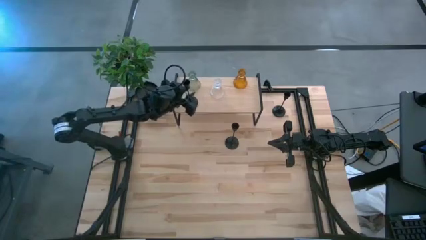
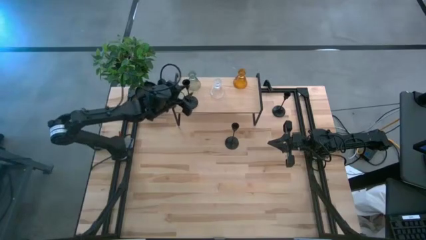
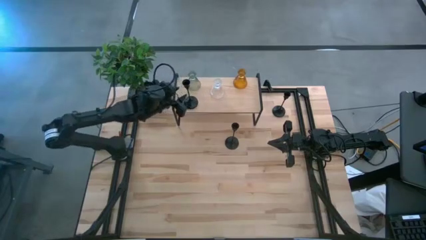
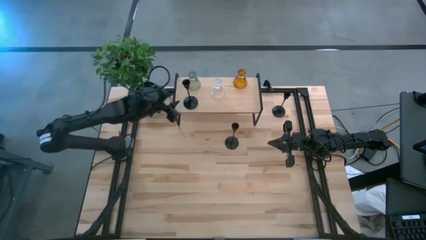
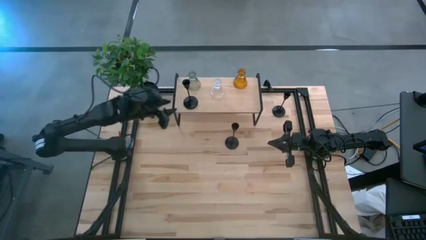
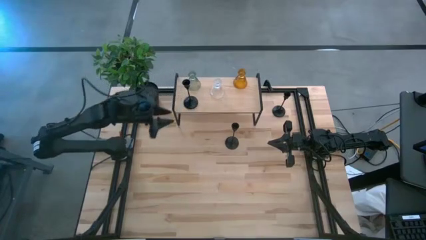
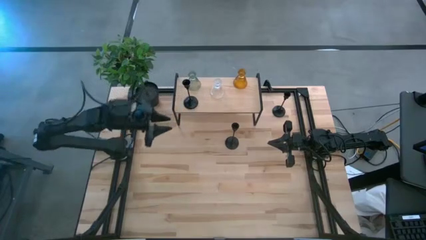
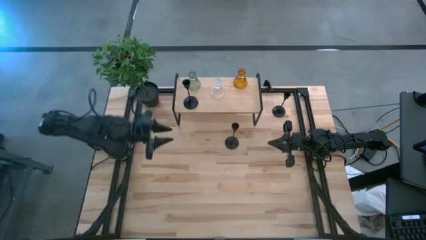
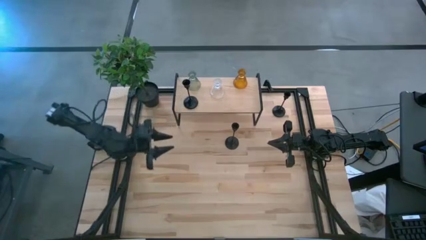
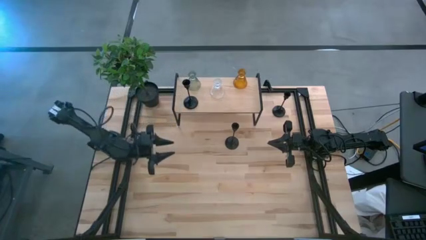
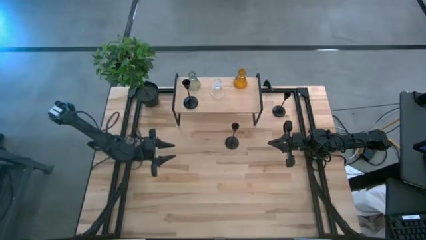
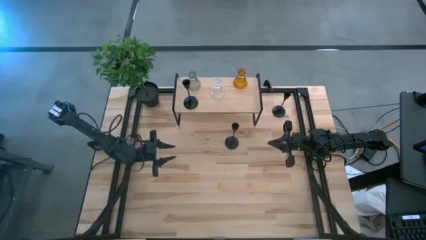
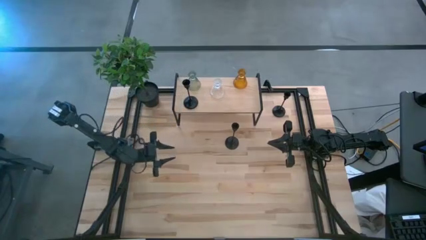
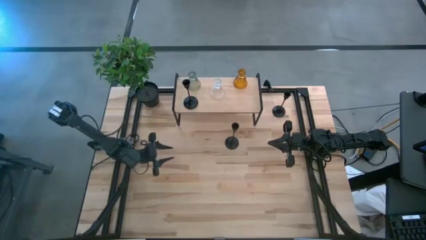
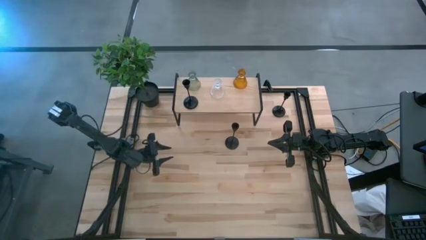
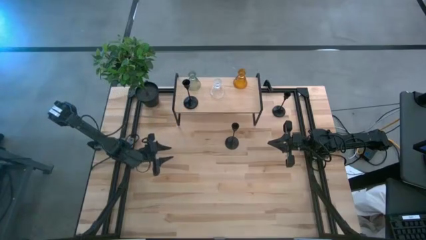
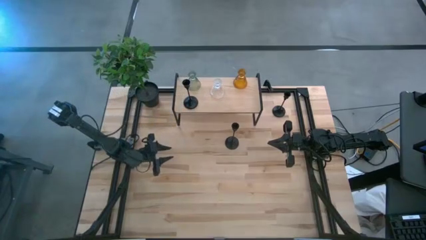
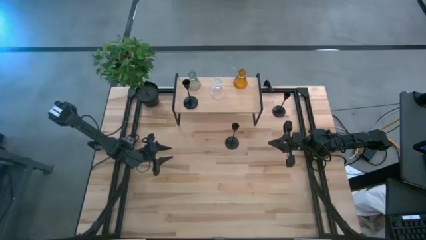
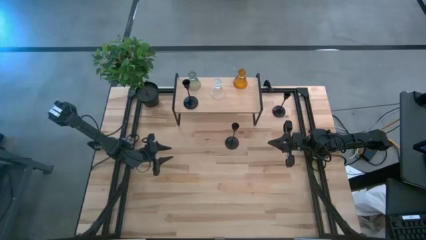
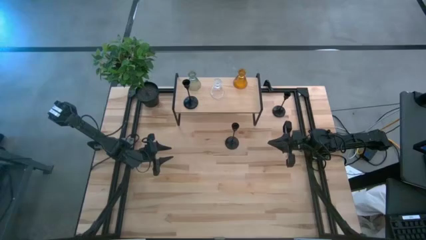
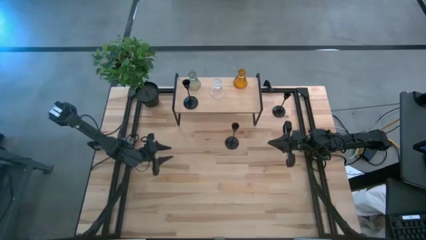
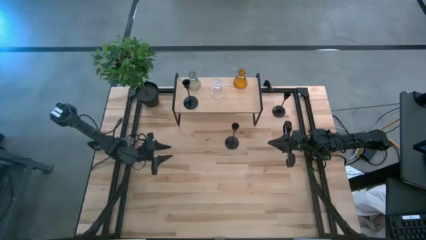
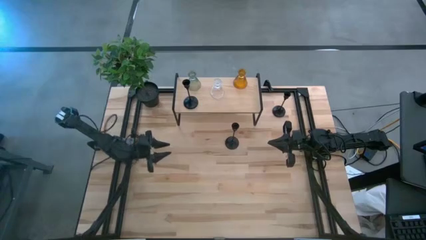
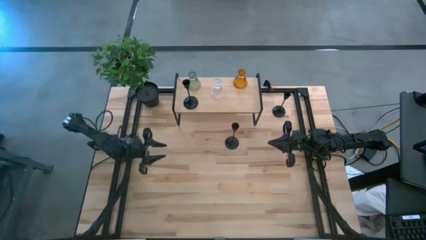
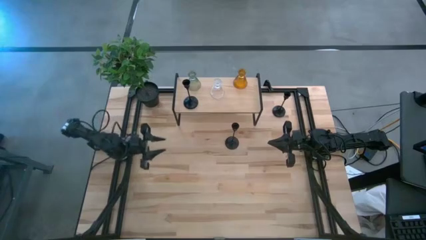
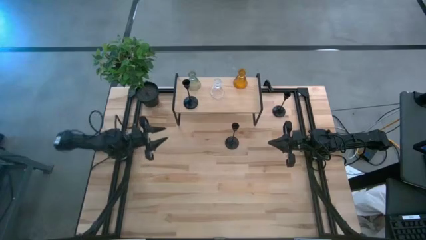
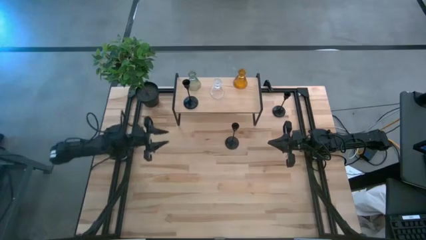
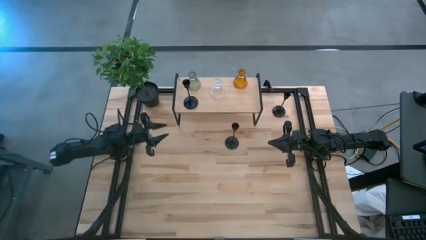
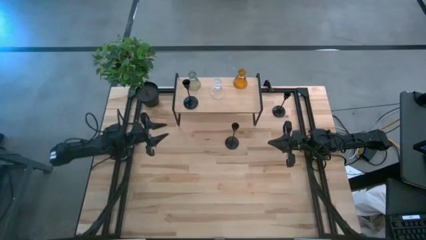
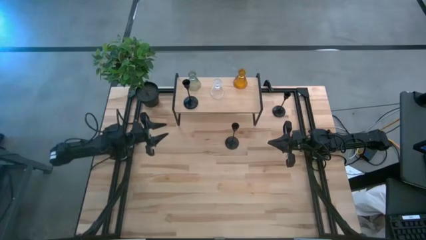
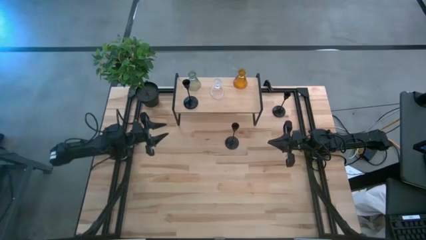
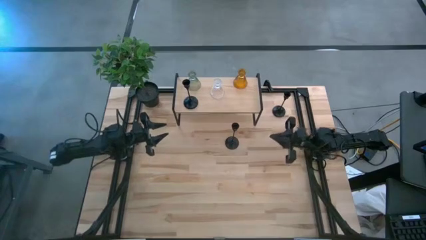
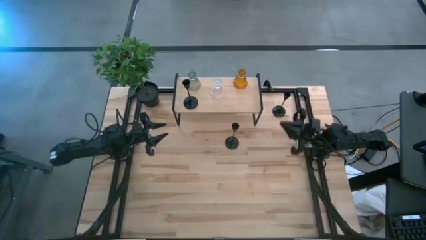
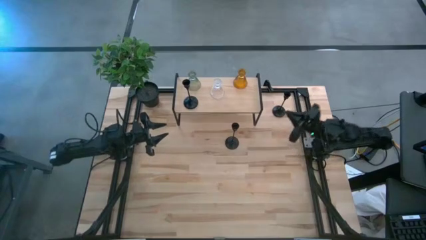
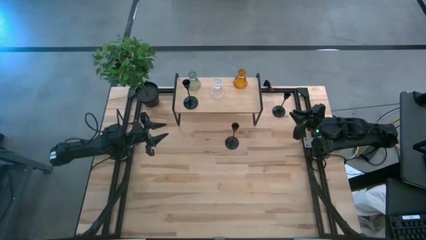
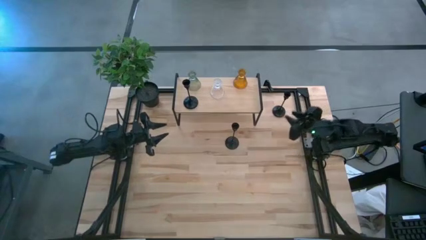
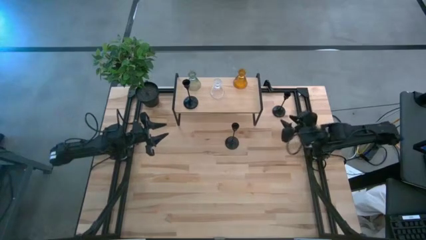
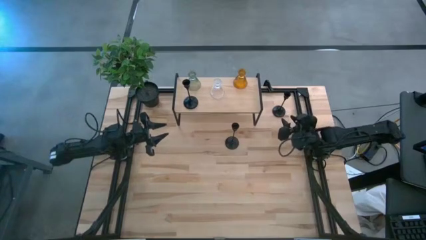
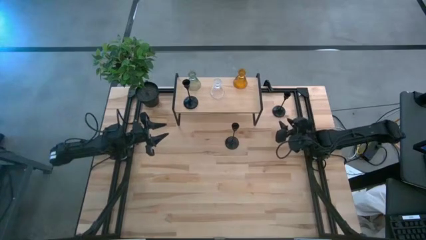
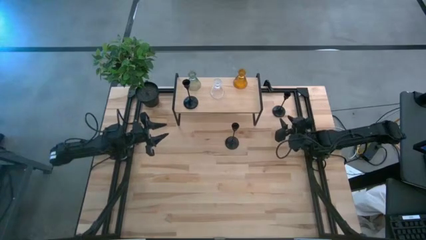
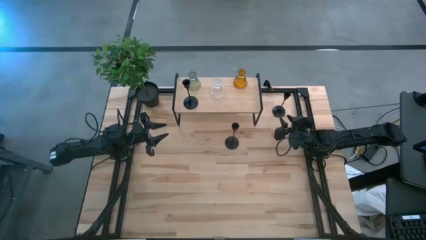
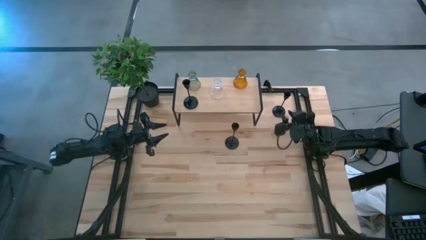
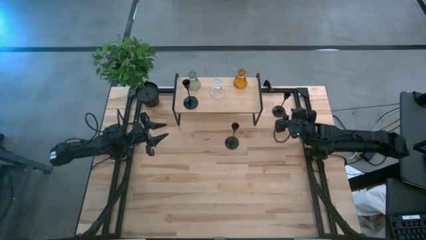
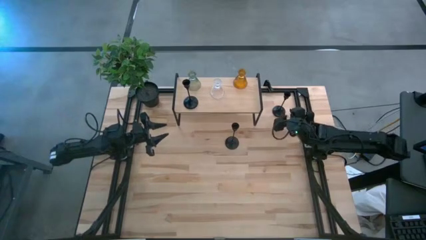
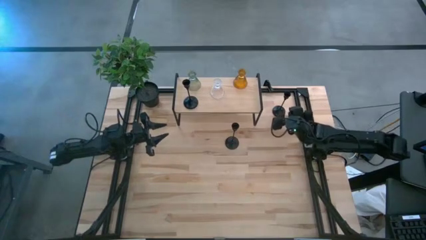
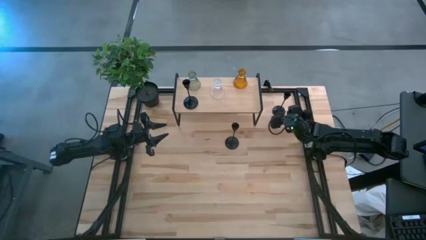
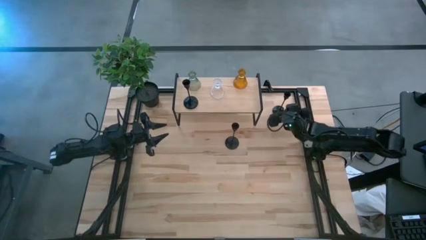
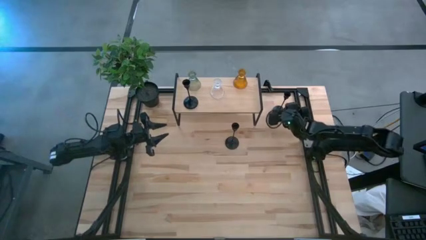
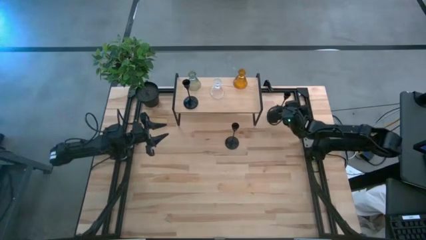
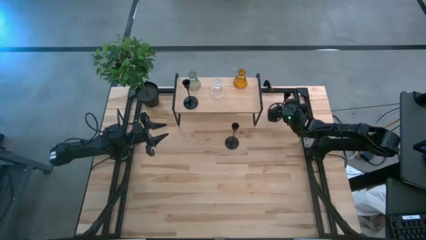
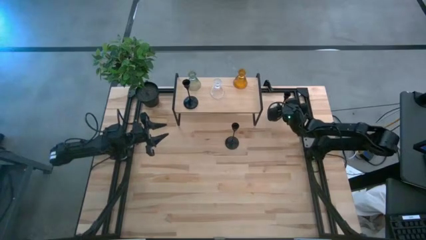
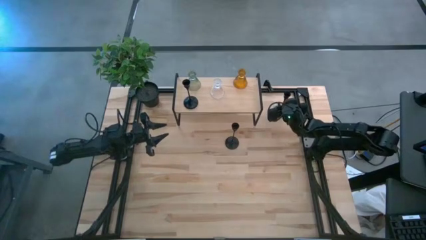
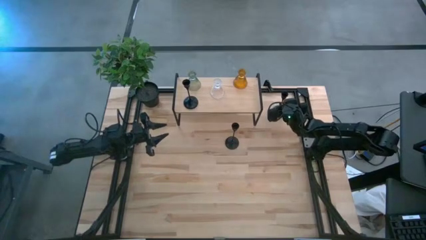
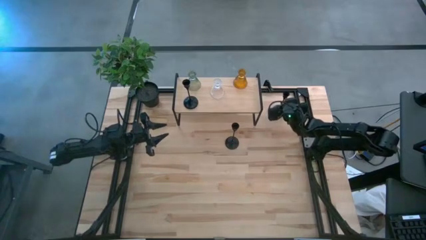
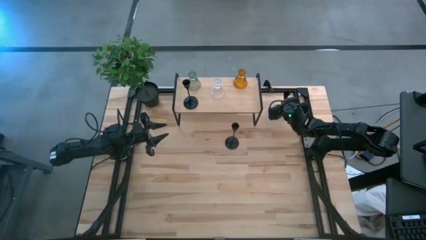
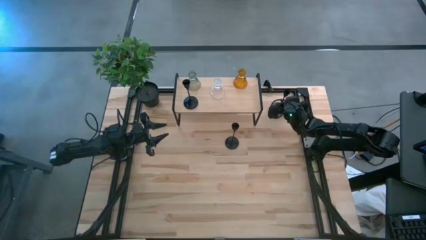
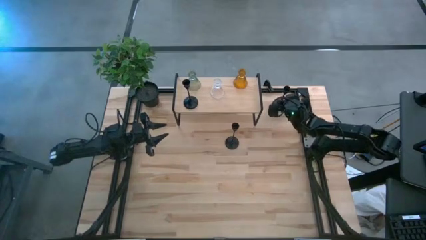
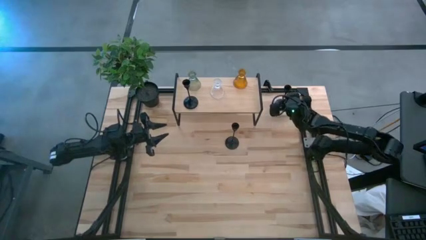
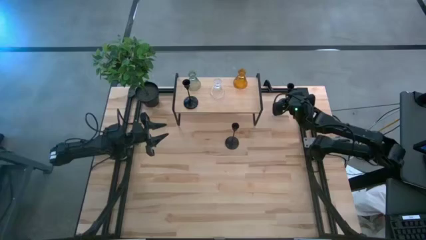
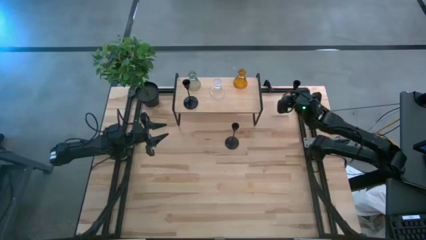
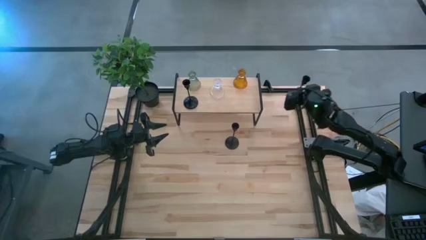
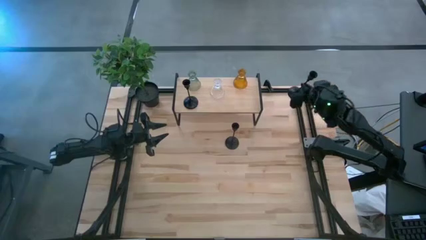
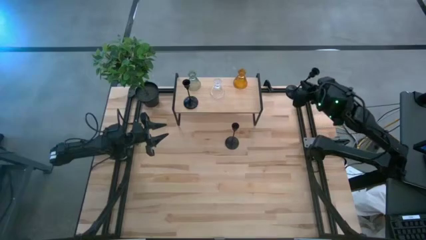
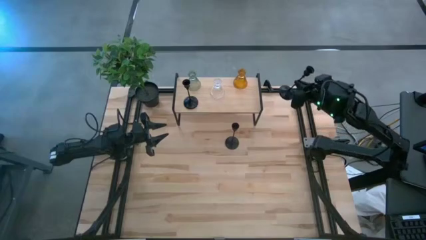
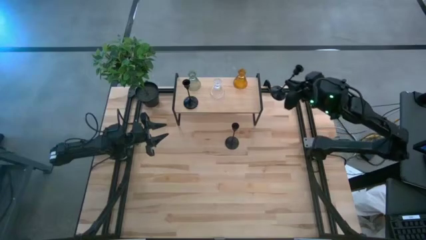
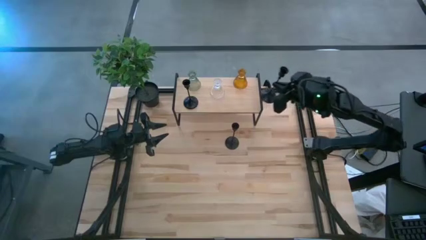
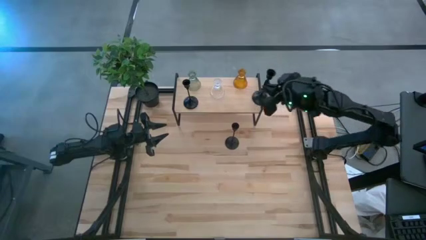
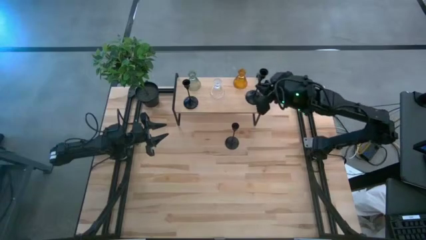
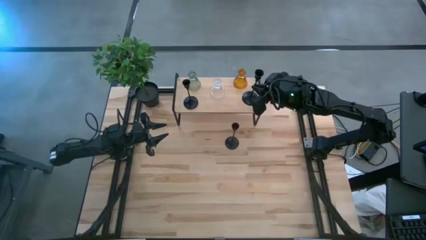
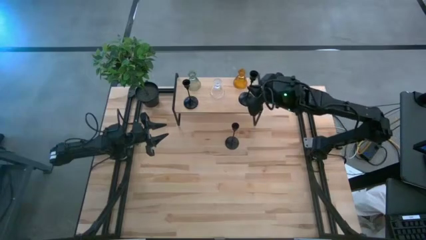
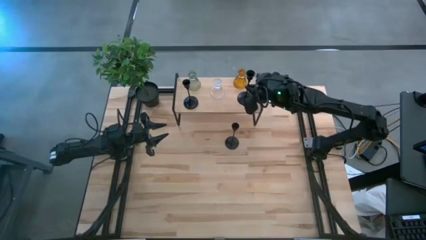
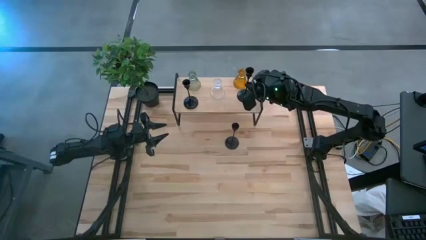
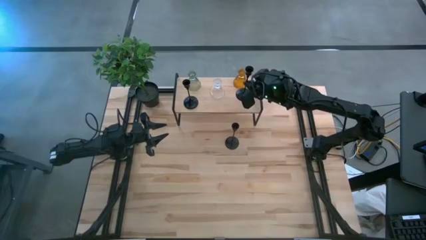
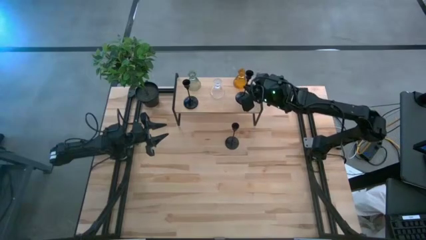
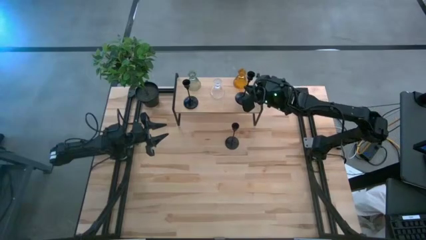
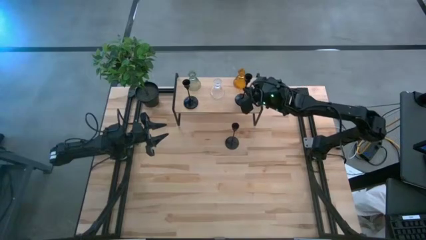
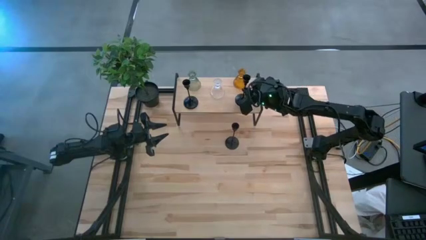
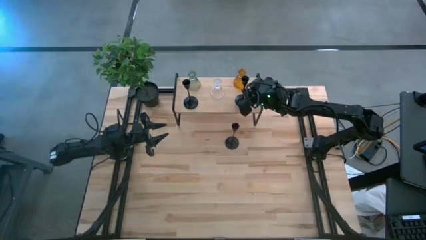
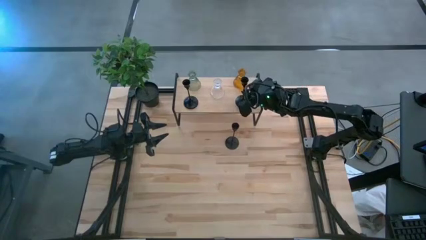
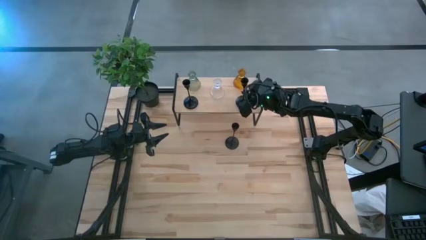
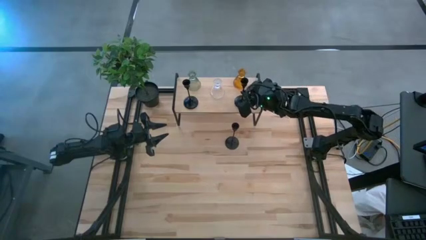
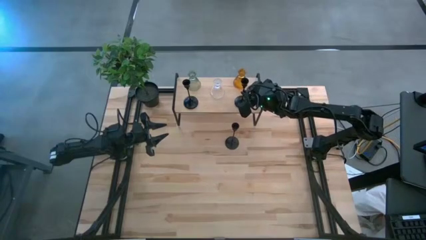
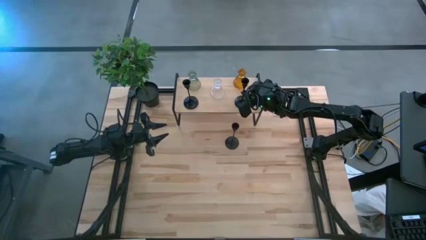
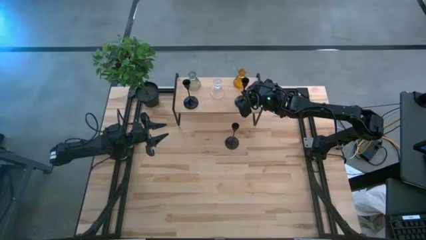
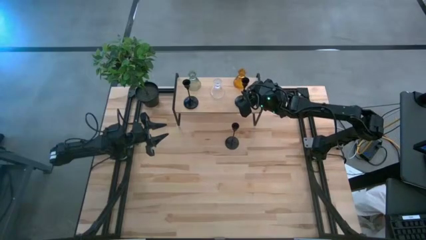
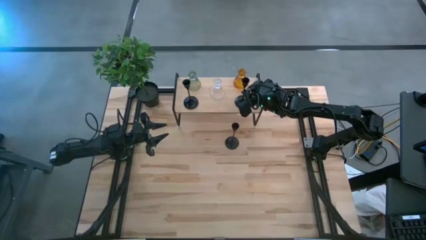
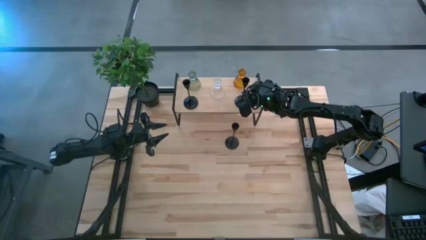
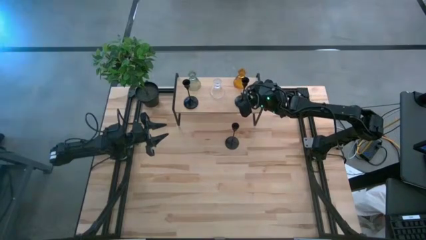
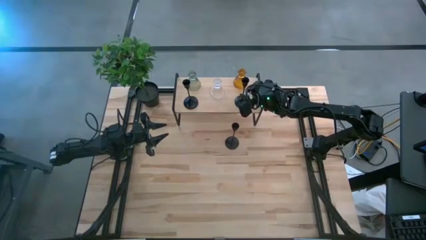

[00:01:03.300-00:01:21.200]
Task: Pick & Place candle stick holders
Put the right black candle holder on the shelf aligned with the orange candle holder
